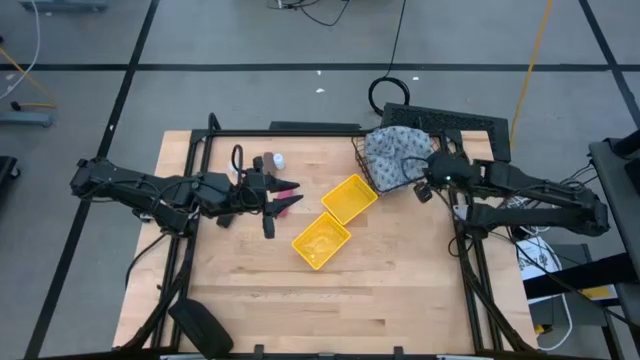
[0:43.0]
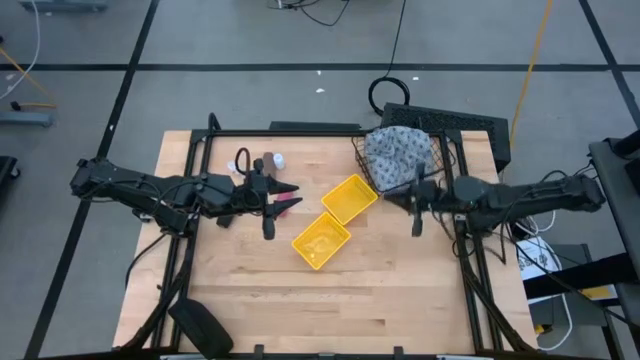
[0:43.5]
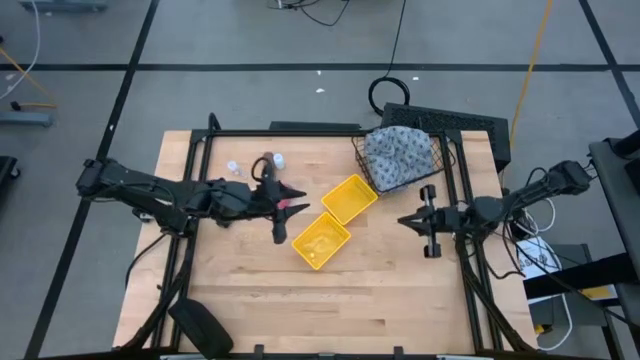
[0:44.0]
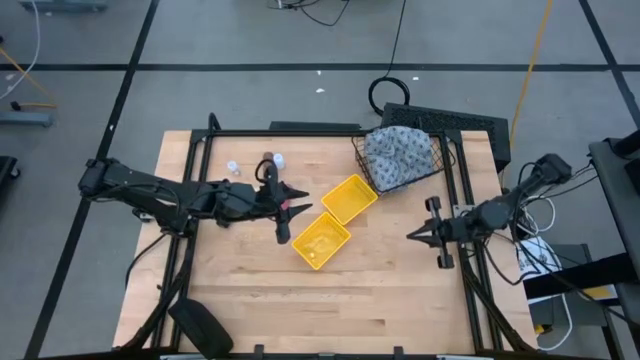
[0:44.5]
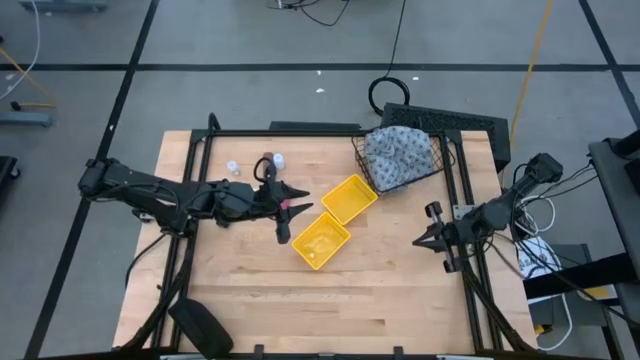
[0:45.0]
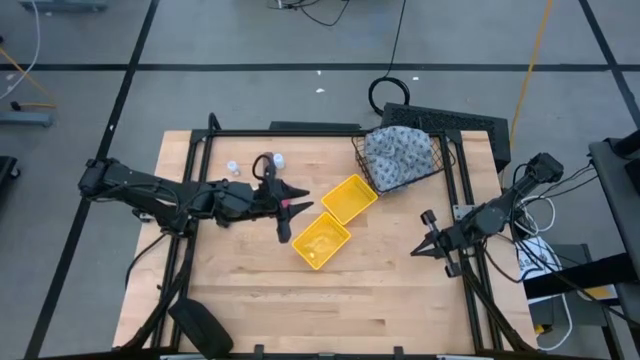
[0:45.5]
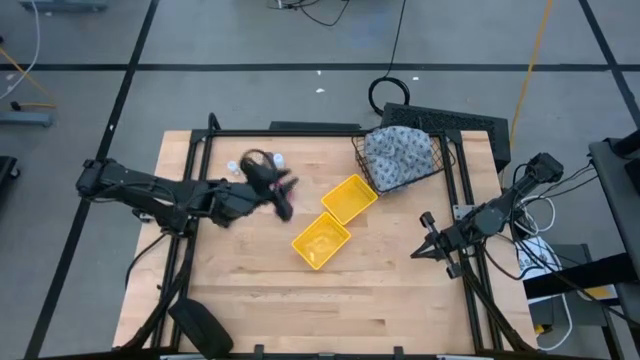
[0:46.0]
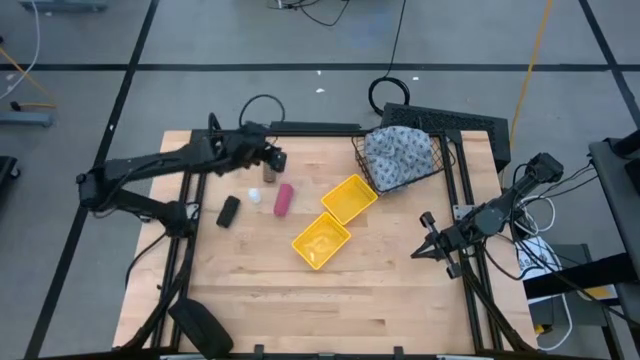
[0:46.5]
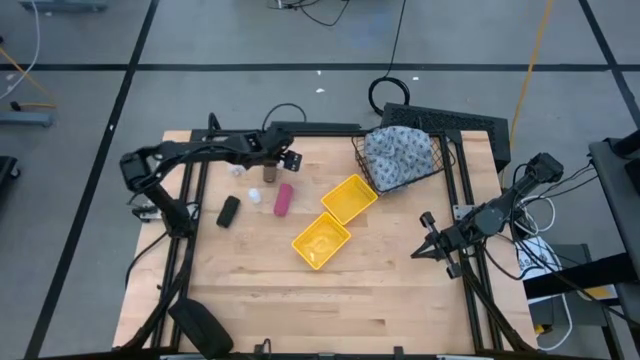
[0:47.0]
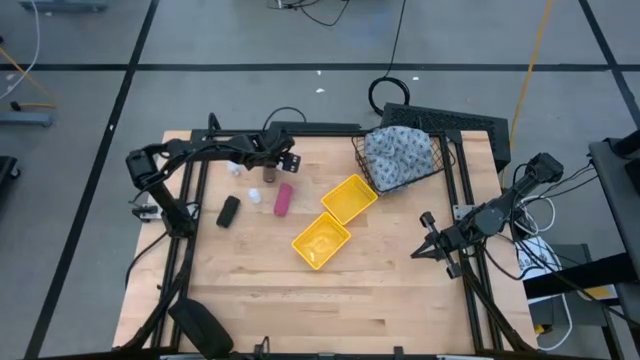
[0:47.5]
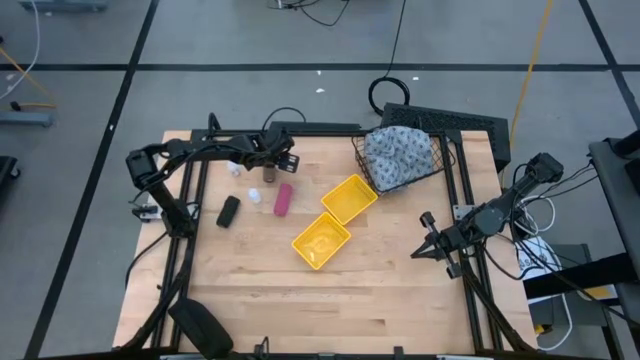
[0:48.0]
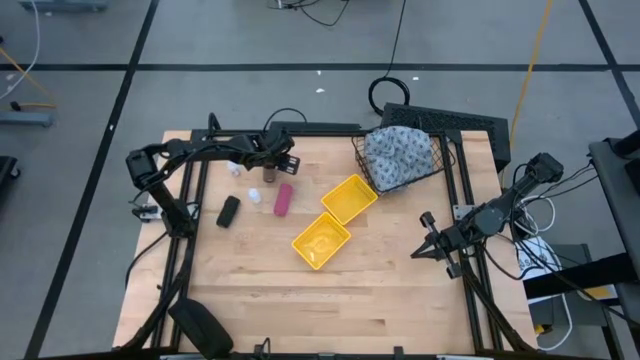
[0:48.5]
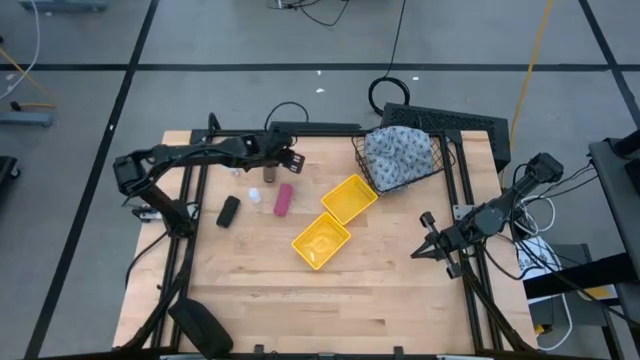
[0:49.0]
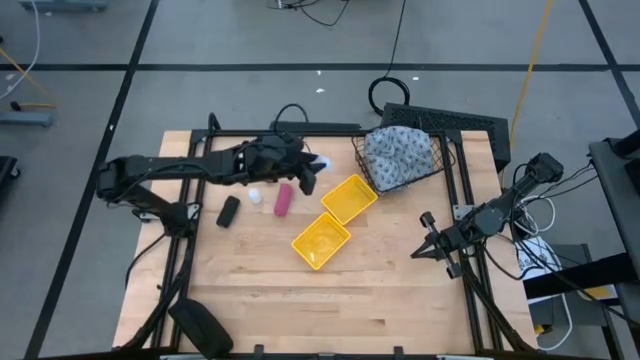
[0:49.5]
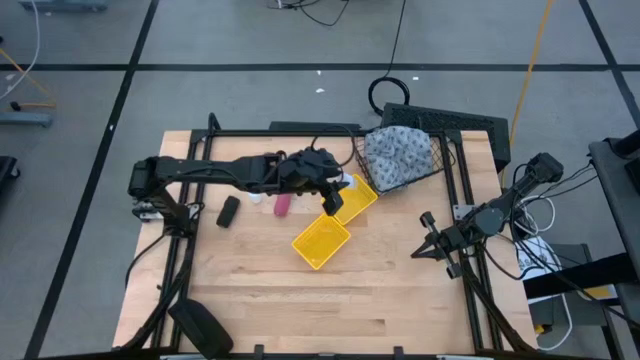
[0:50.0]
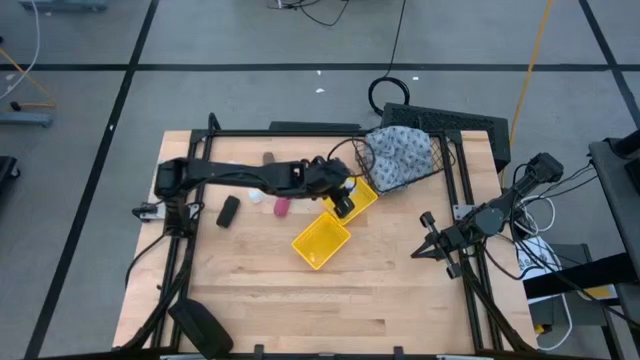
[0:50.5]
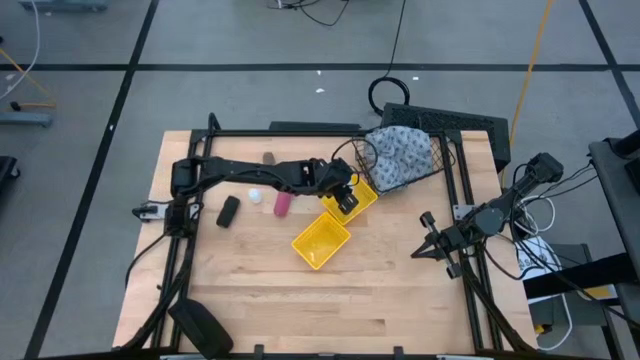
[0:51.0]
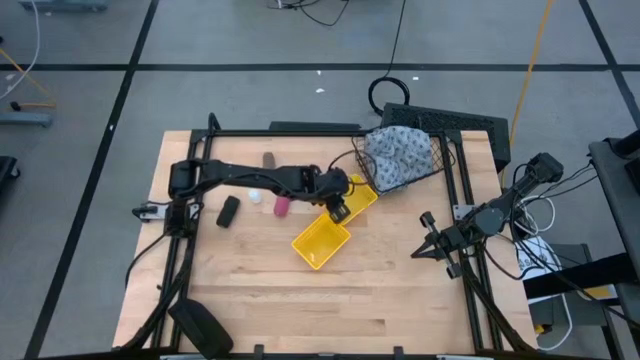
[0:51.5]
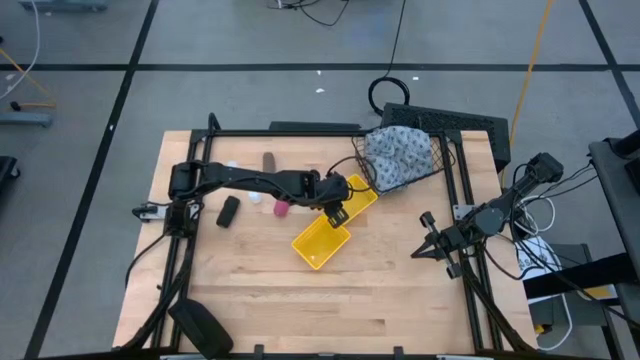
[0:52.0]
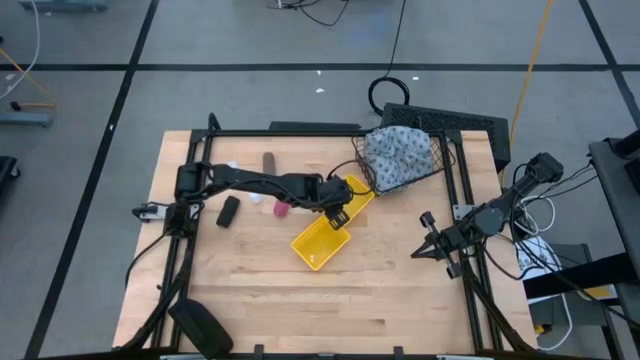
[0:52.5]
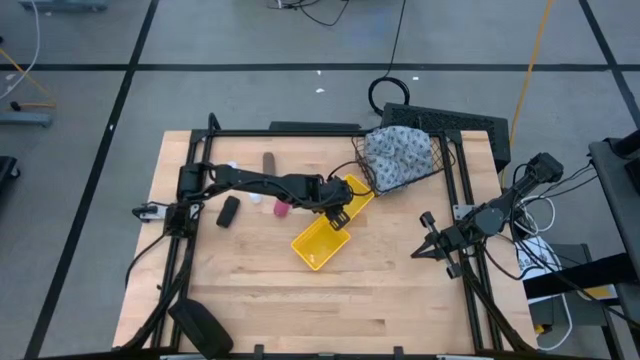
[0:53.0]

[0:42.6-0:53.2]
Task: Pick & place medical supplies in basket/bin
Put the top right white pill bottle into the top yellow basket

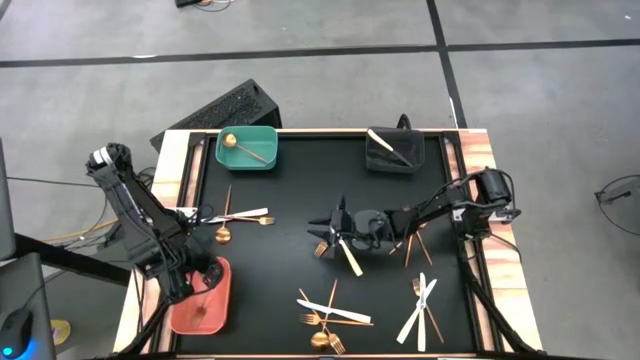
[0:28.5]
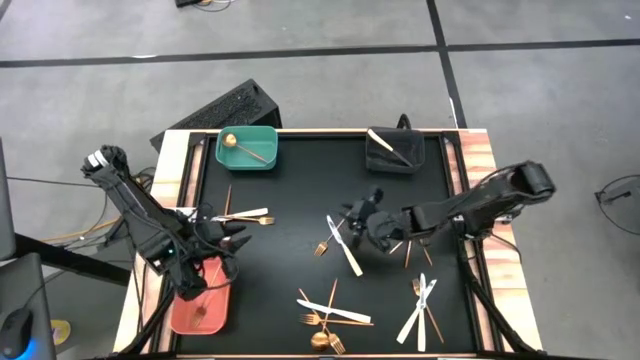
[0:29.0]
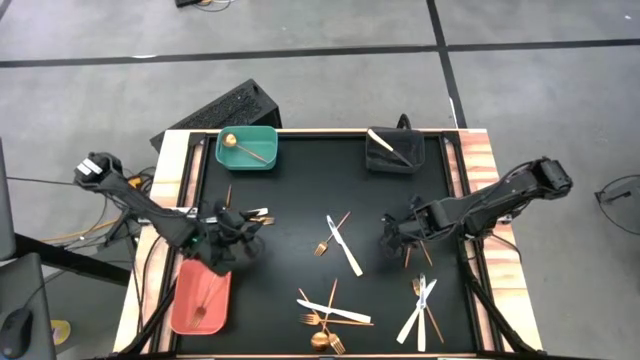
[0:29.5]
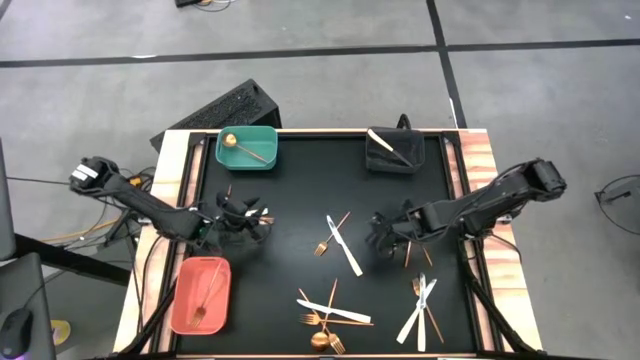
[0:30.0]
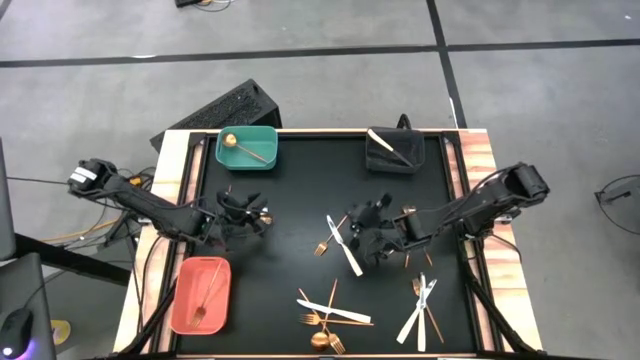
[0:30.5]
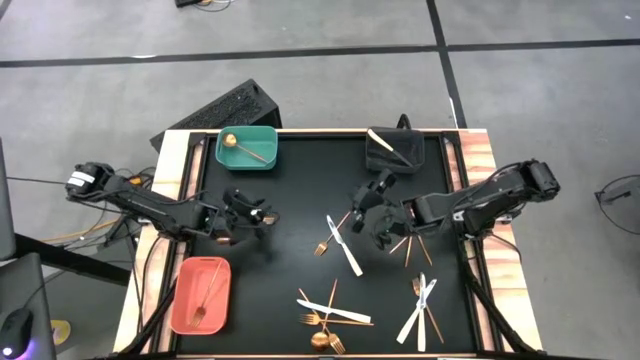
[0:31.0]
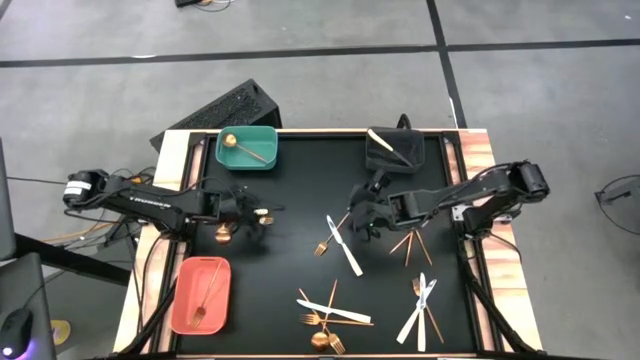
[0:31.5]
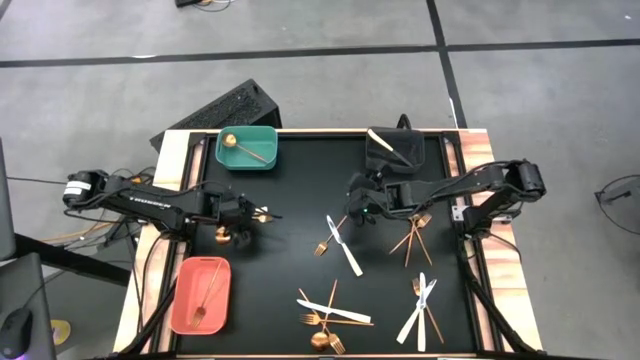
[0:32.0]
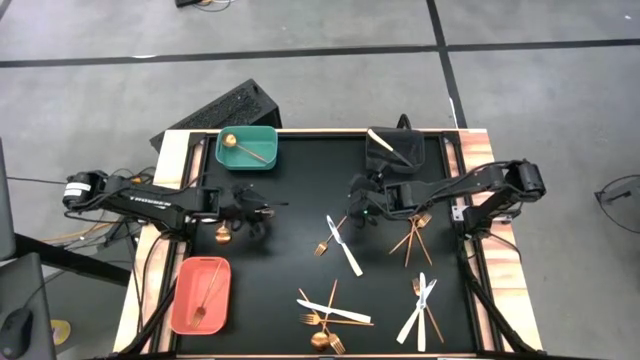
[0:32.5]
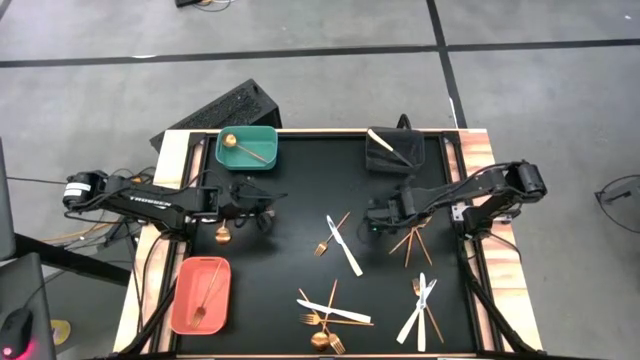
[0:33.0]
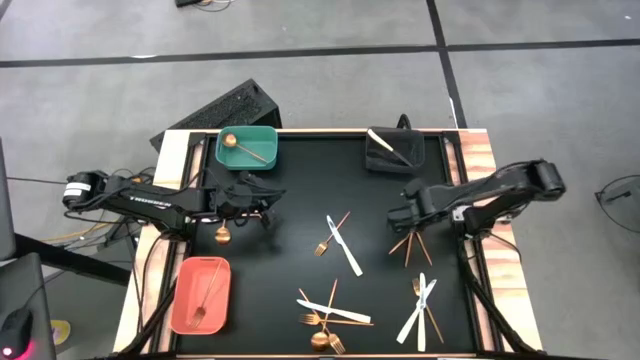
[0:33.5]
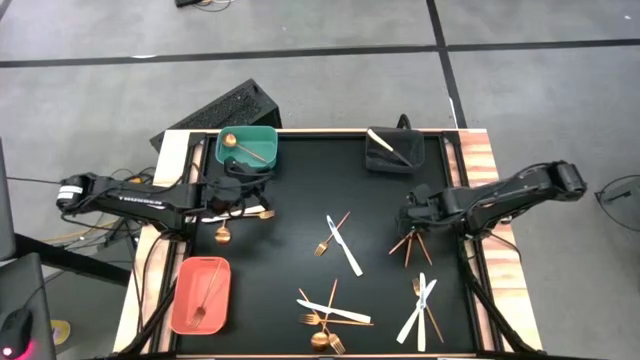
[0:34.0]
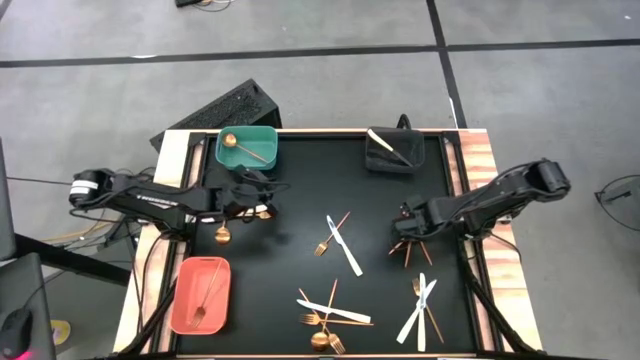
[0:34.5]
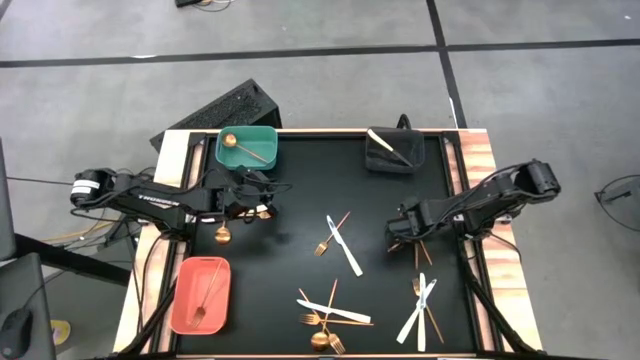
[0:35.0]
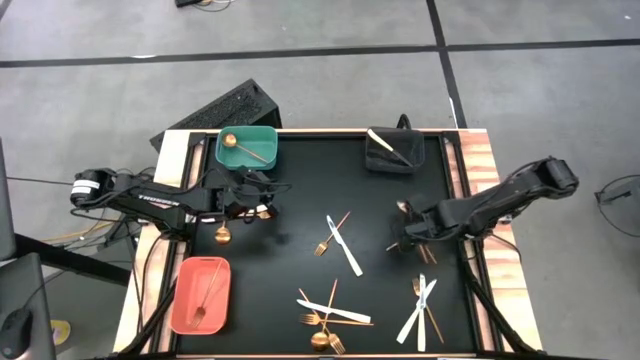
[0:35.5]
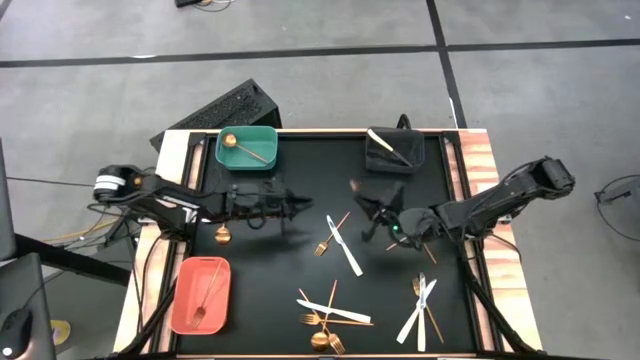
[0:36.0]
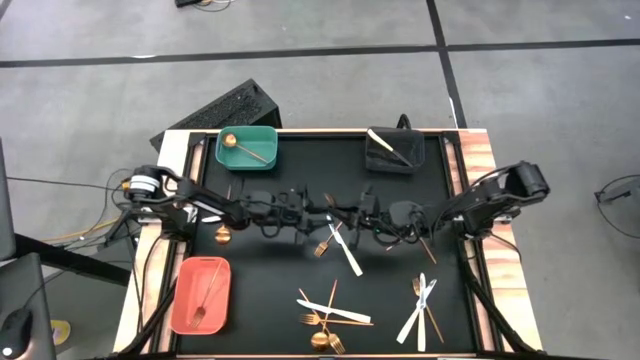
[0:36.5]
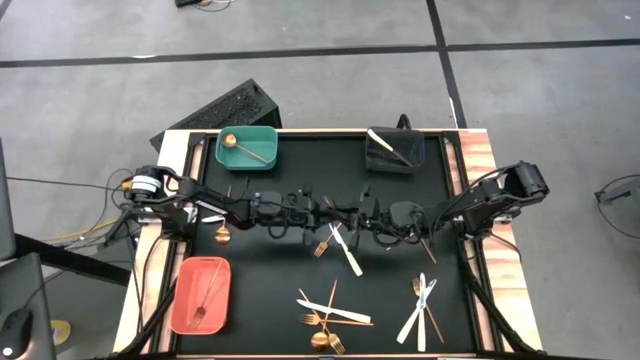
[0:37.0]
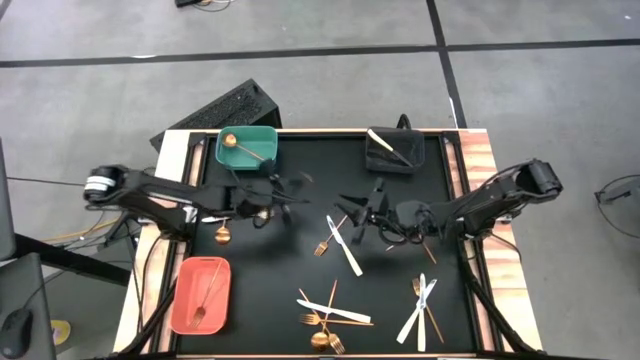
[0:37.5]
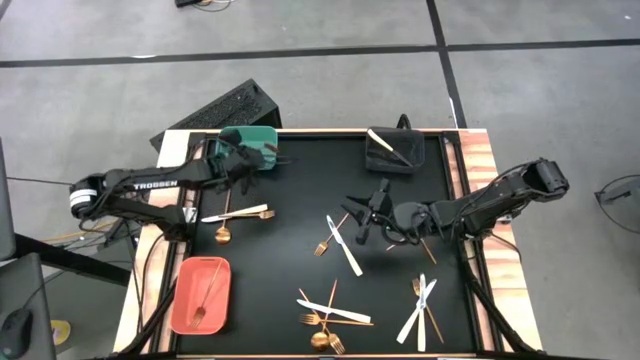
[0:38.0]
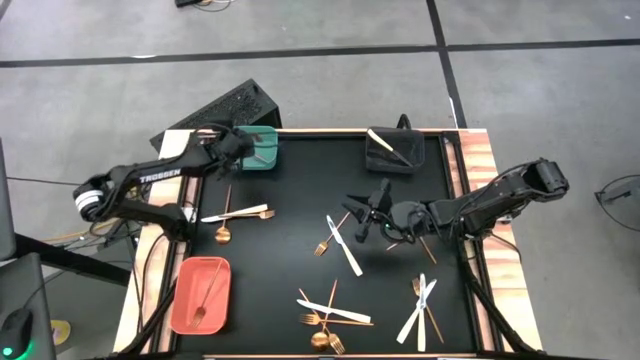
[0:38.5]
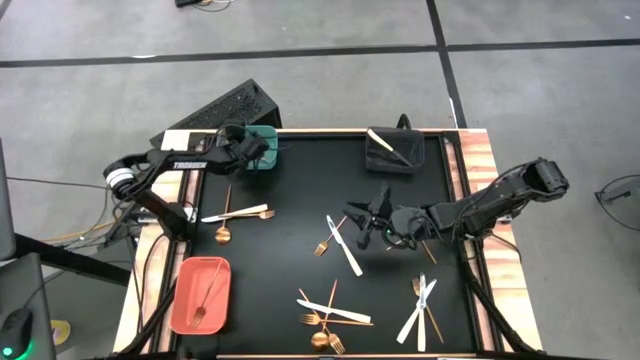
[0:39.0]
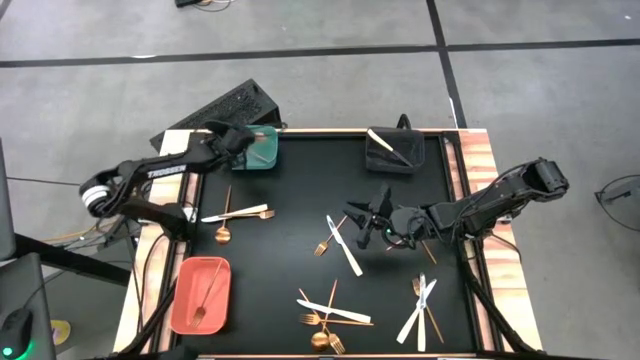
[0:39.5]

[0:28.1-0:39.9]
Task: Sort silverware by color (type)
Put the gold spoon into the green bin
